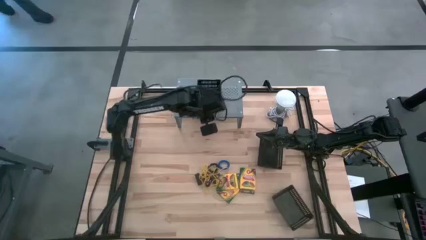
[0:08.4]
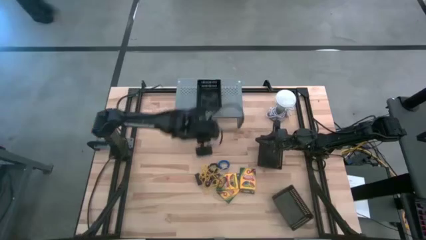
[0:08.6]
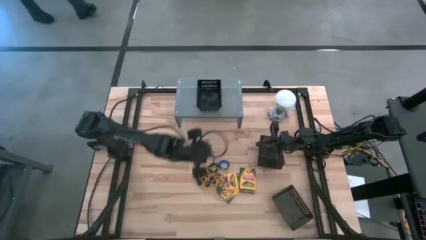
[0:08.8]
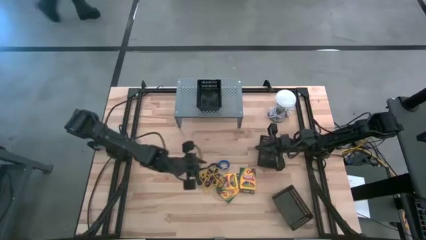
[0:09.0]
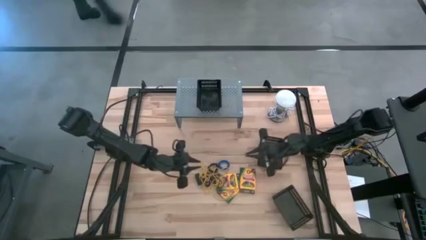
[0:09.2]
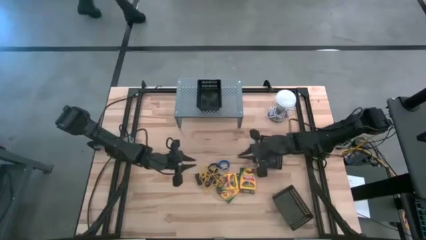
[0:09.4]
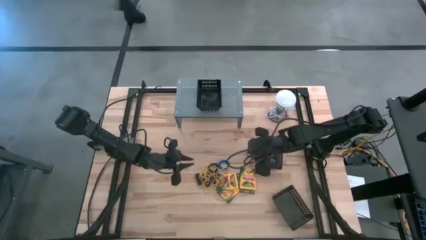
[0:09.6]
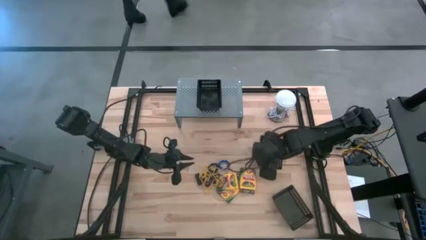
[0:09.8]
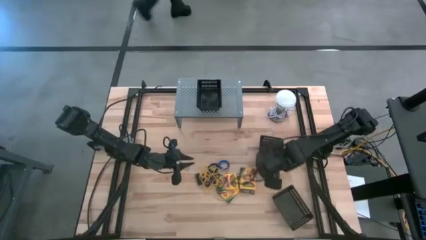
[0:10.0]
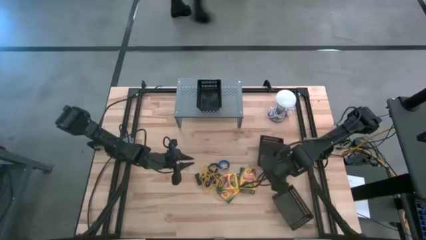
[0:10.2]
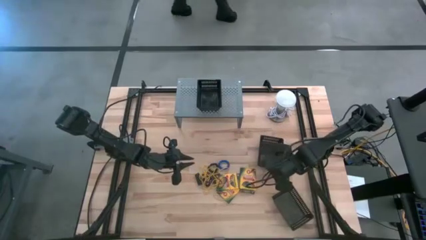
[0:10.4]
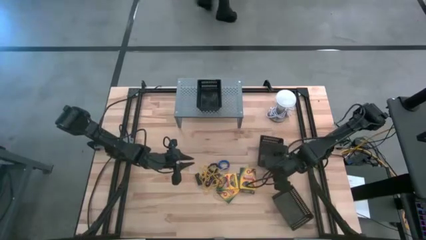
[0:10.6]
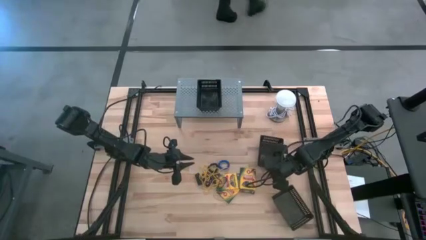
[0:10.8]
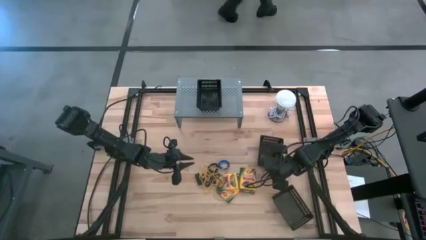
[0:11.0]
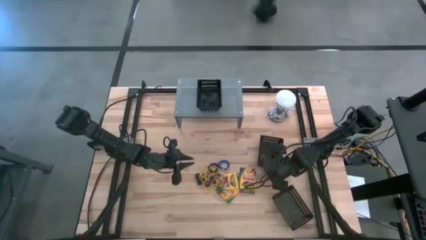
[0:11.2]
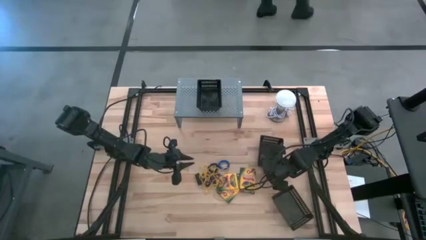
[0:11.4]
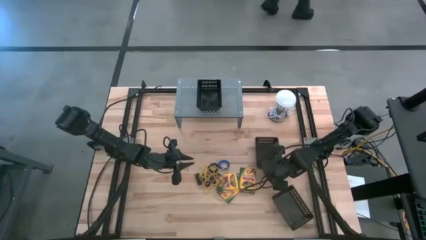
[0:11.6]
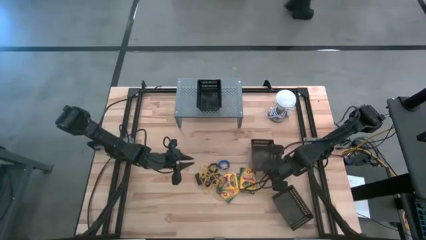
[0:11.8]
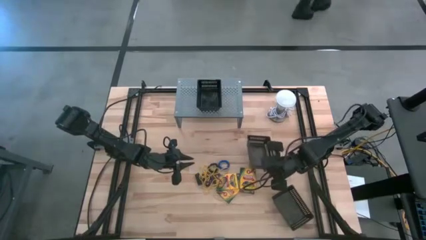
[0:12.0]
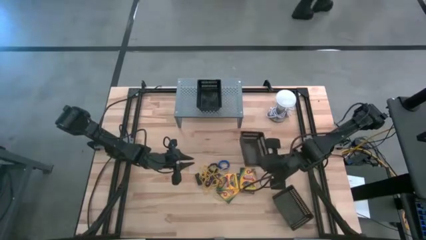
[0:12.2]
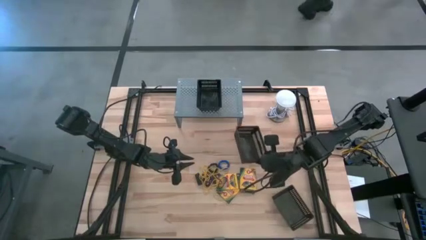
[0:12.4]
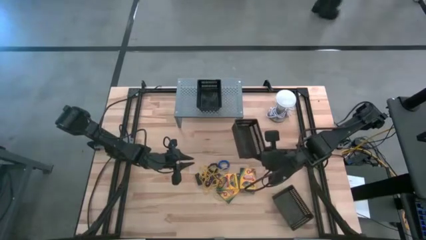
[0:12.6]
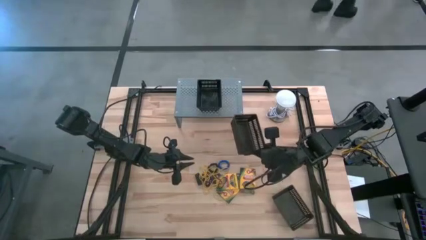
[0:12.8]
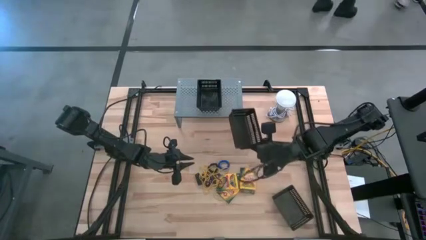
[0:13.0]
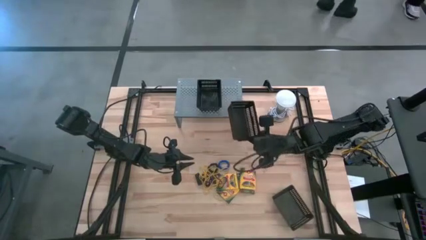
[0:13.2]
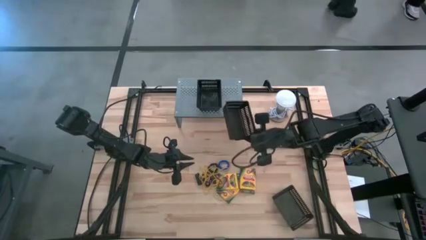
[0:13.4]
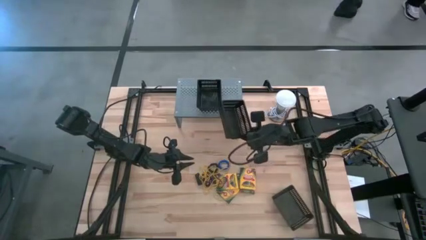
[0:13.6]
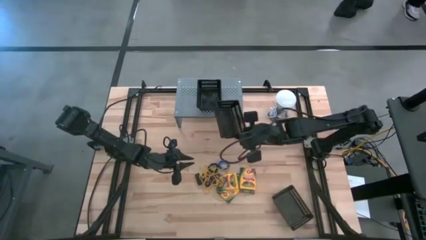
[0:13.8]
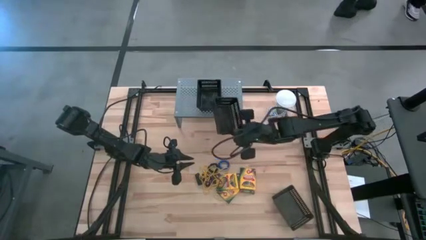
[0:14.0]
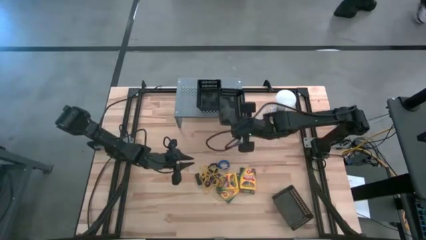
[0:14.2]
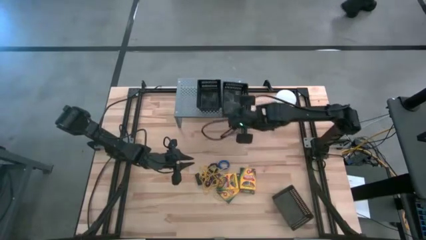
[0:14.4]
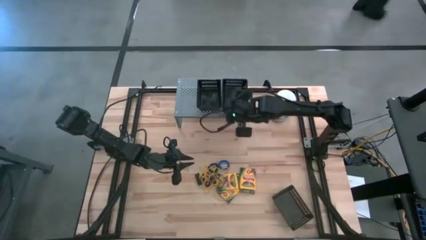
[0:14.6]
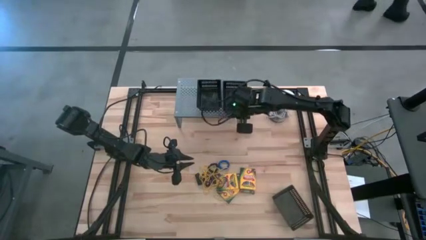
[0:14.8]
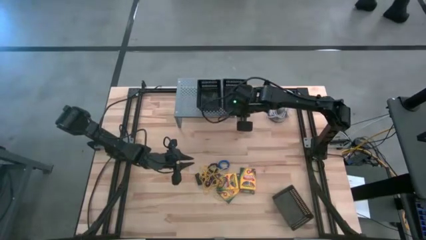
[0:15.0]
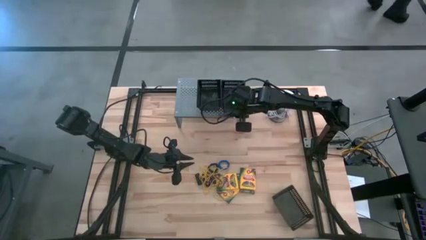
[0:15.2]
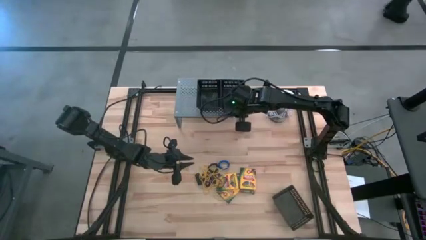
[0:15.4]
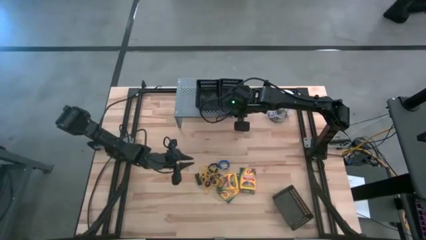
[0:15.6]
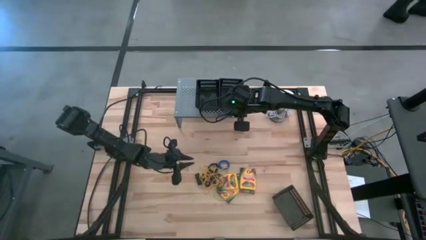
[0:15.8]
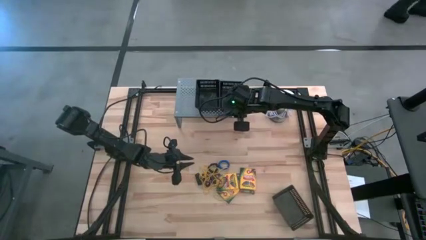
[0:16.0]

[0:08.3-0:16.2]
Task: Pick & Place Office Desk Supplies
Put the top black bin on the shelf

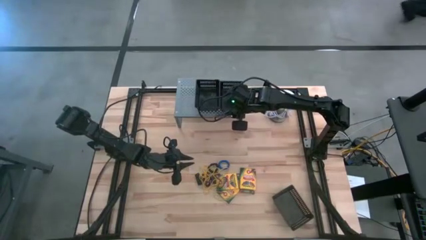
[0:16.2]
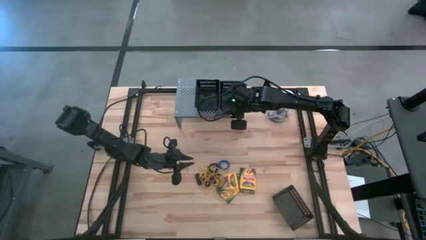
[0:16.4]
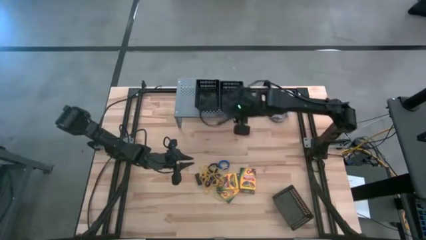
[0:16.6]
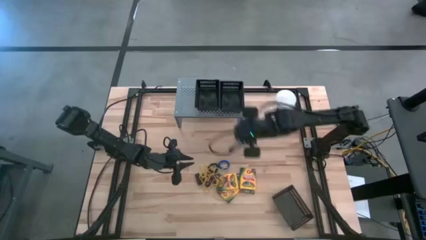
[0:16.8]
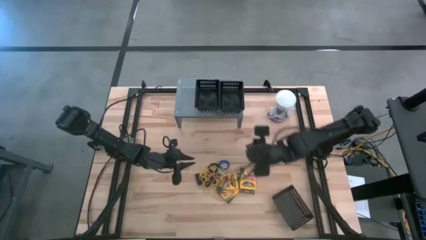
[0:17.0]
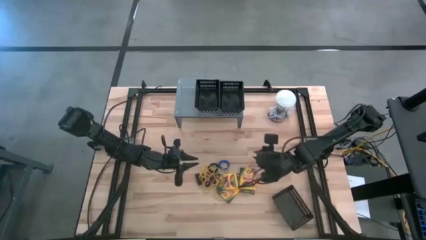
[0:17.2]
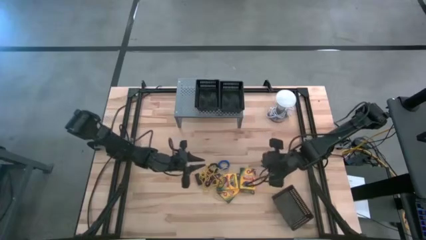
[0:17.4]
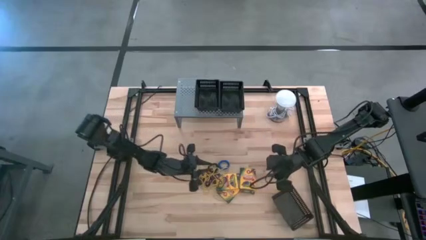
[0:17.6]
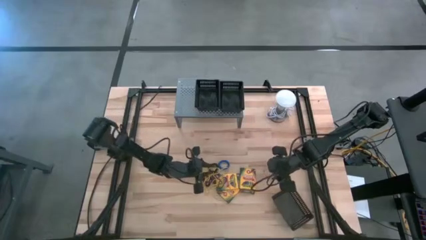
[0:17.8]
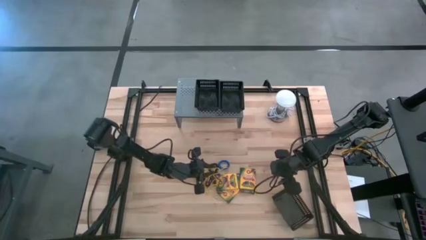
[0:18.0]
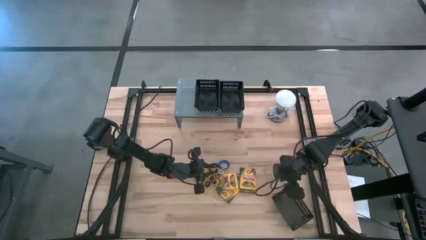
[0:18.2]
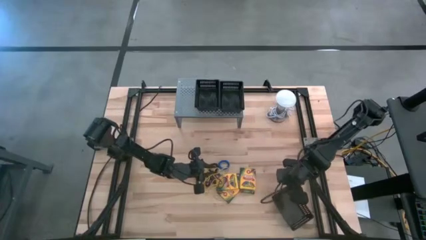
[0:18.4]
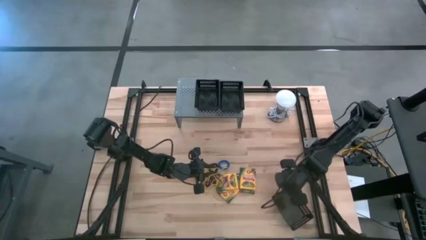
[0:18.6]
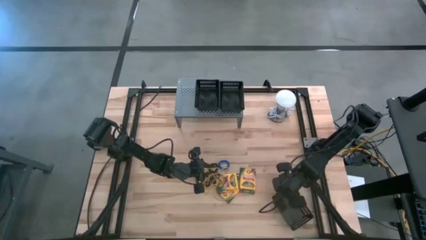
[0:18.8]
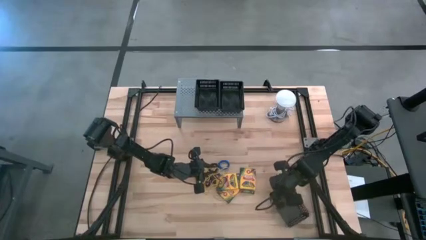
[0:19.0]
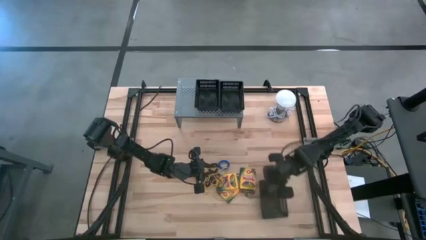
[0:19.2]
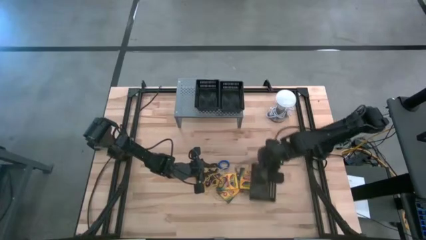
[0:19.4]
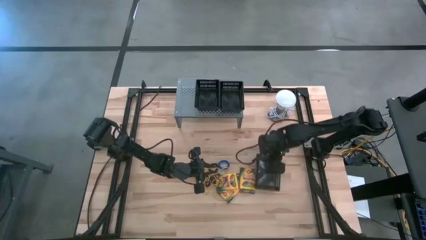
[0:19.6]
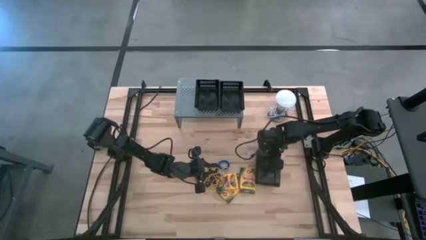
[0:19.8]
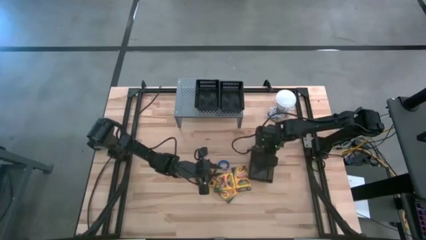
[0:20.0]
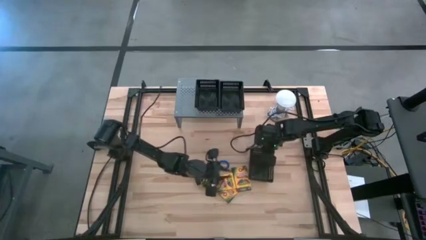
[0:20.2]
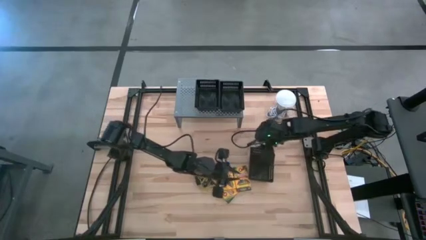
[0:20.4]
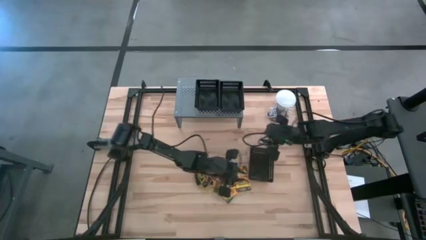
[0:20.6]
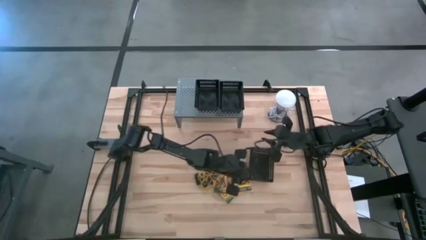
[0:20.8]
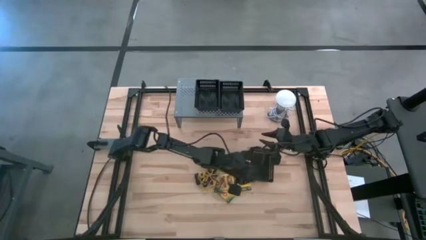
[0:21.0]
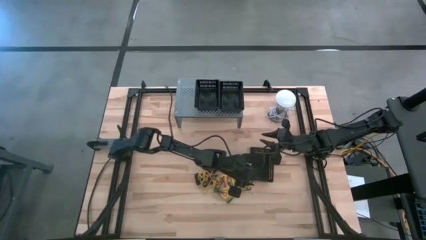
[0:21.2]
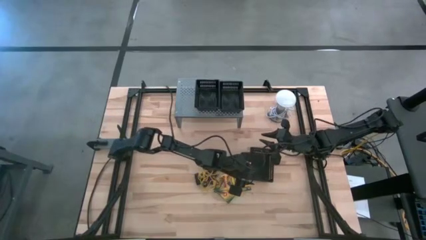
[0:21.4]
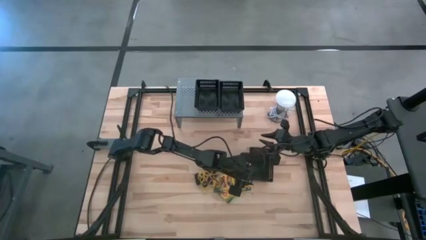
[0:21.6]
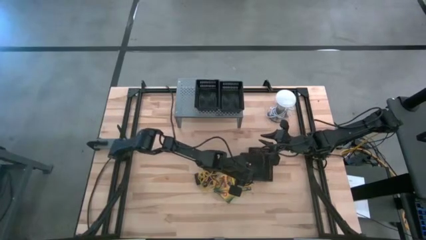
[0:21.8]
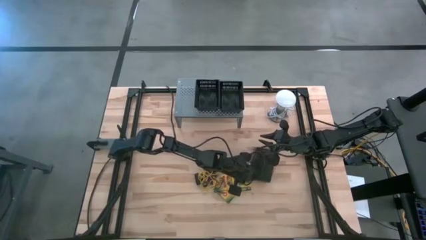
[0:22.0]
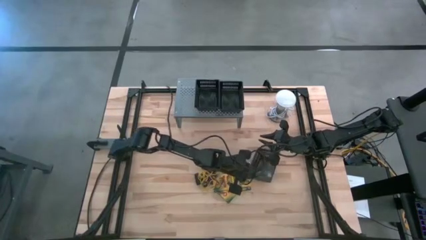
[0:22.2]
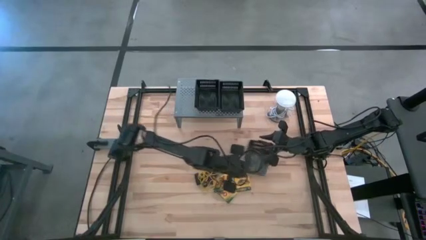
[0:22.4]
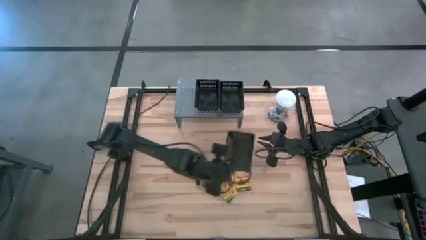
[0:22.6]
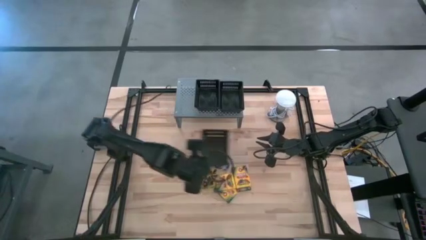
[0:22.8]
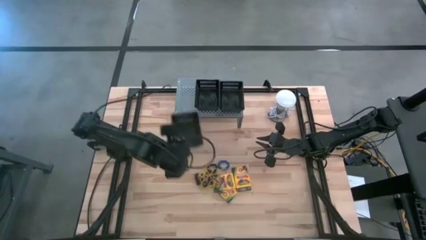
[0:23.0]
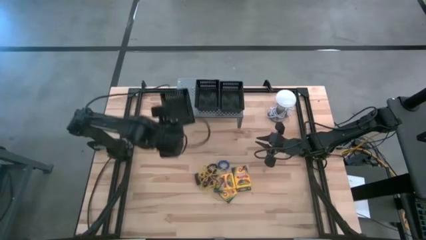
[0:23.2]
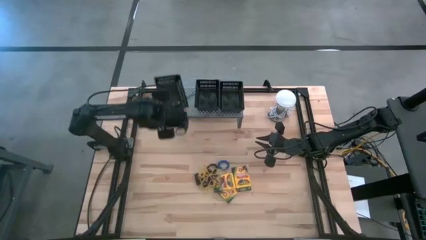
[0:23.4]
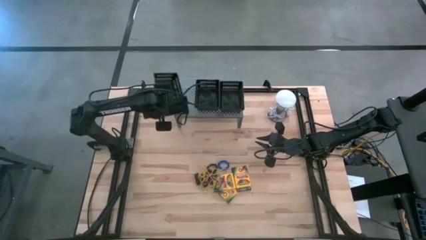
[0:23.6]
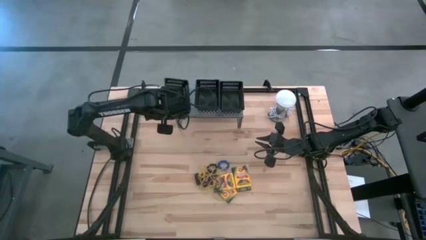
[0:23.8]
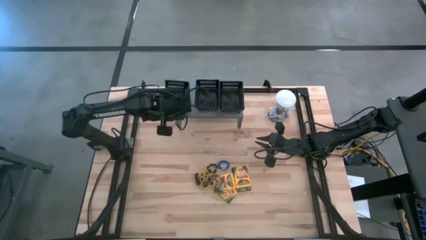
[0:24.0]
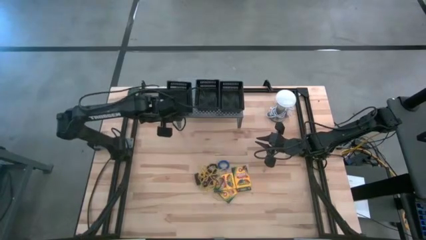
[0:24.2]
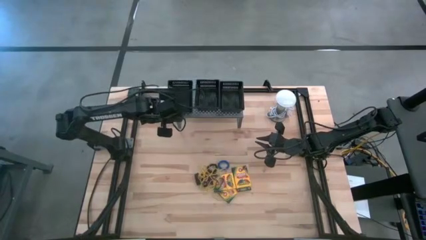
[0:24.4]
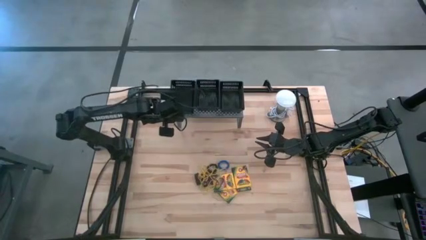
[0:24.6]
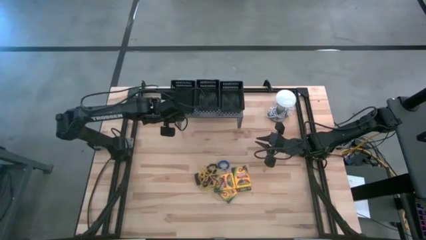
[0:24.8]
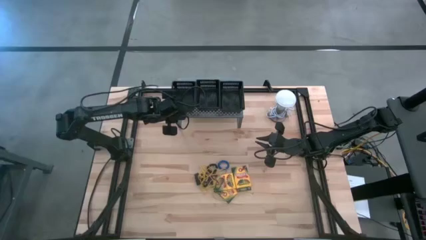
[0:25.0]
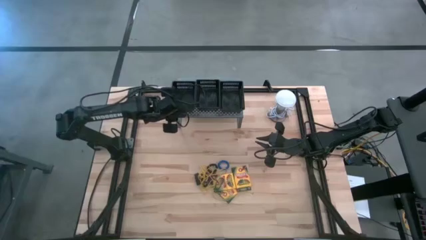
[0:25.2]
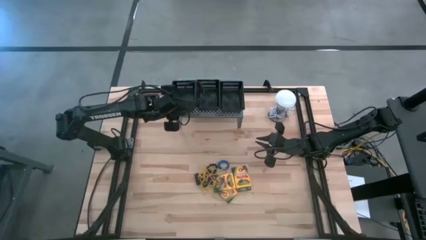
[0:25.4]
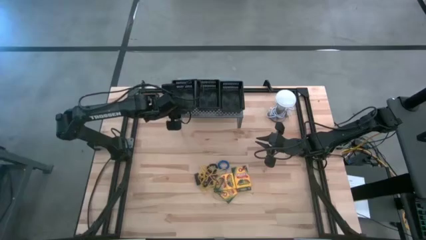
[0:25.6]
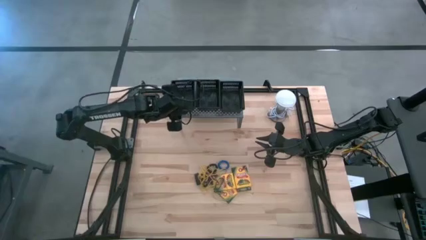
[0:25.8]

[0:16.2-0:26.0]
Put the black bin on the shelf
